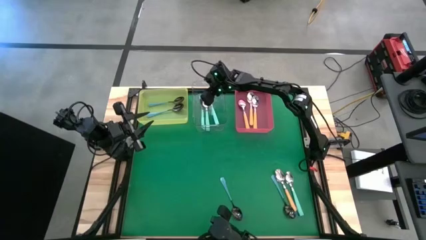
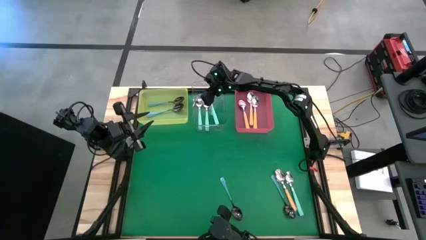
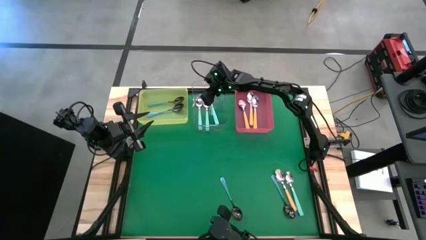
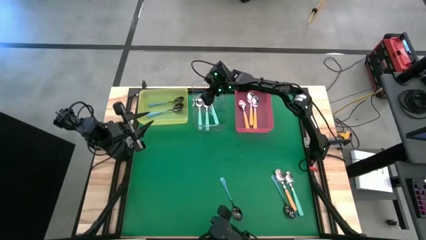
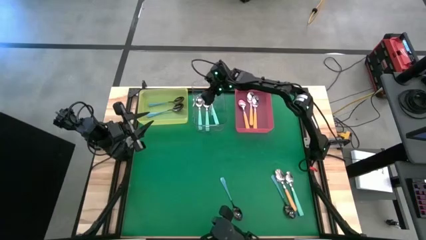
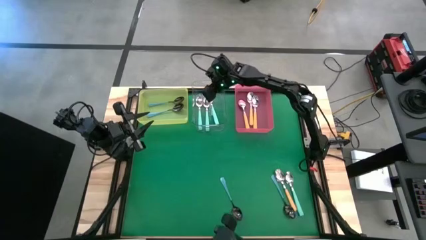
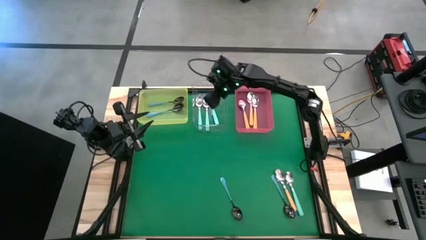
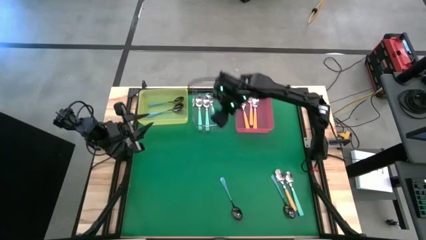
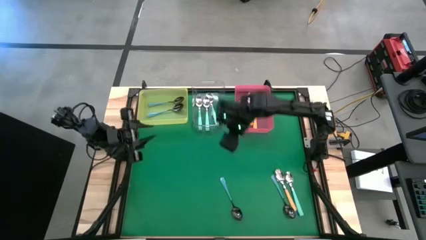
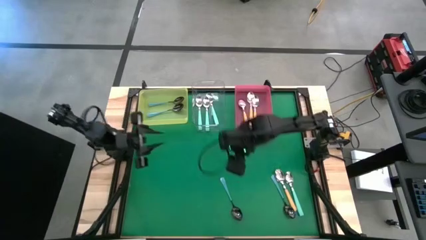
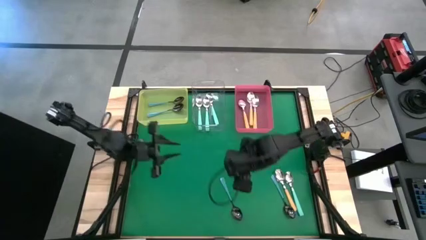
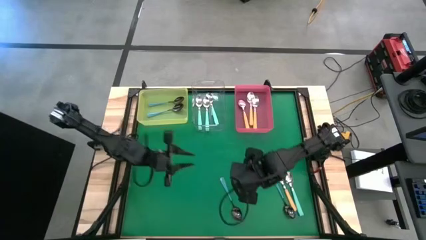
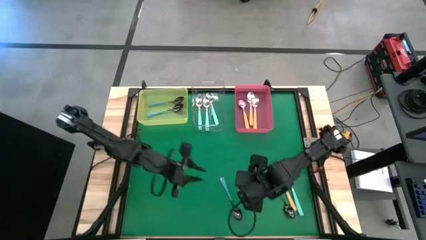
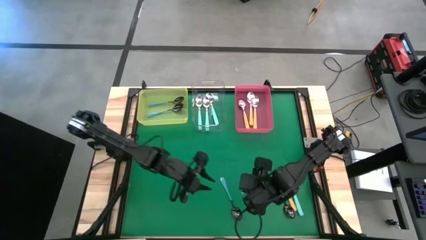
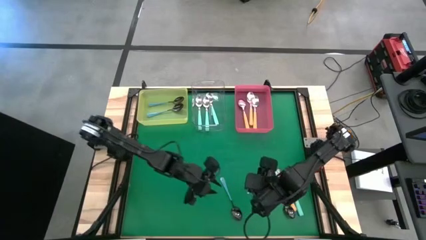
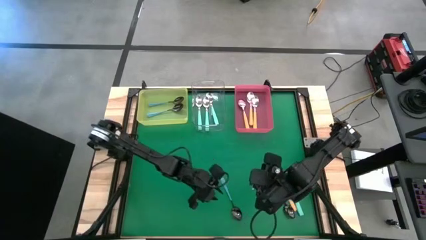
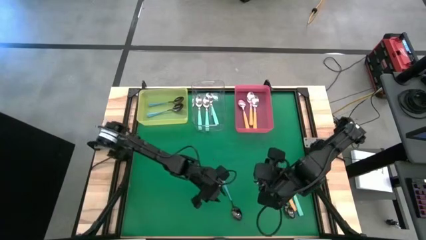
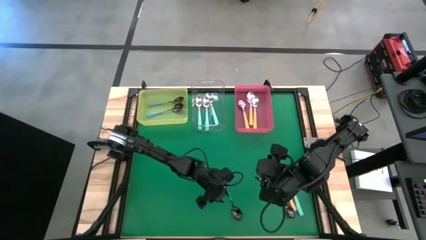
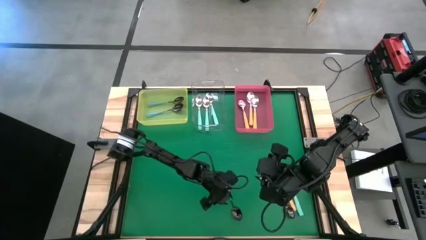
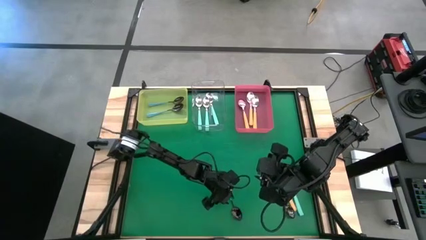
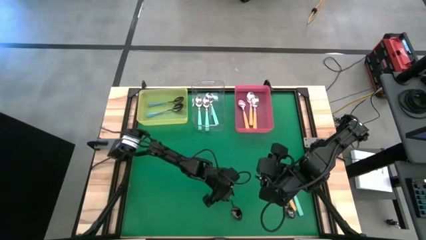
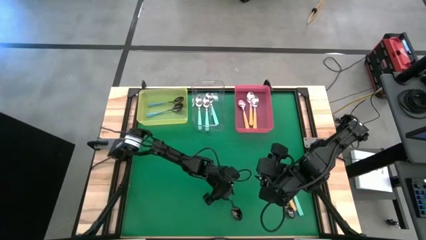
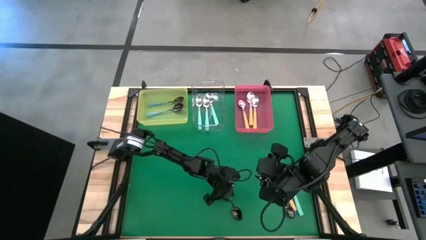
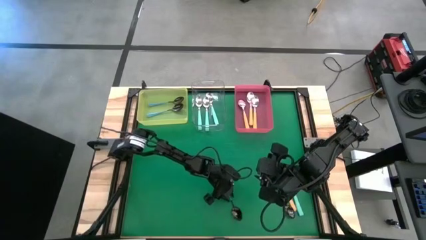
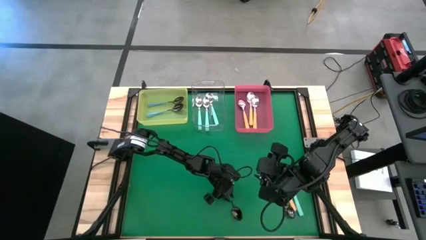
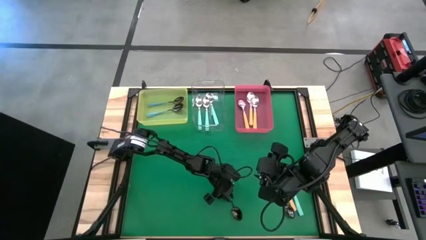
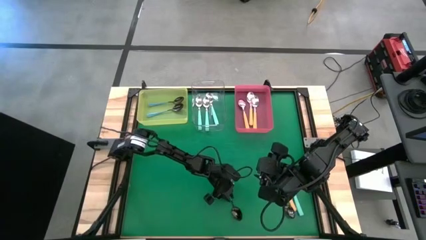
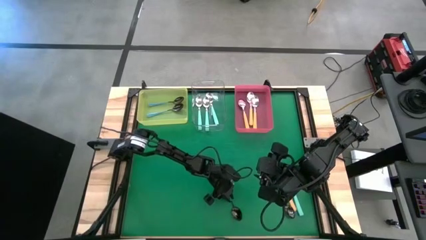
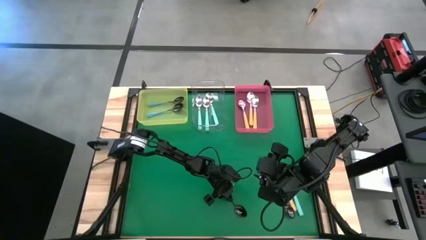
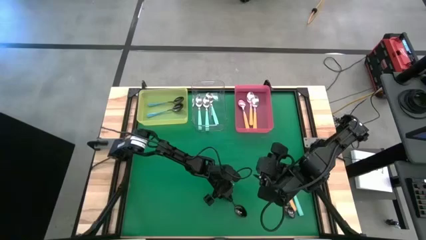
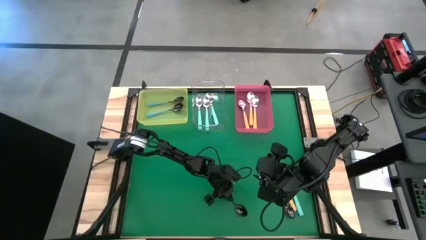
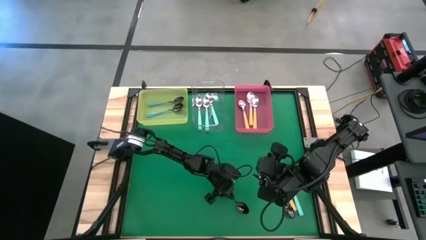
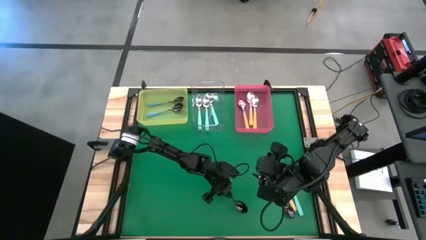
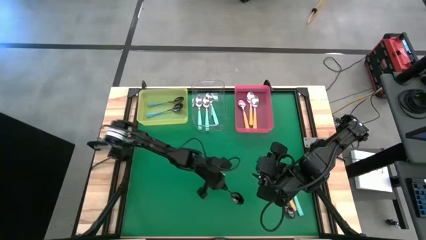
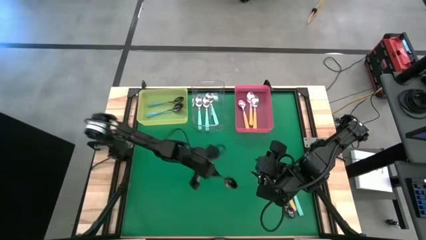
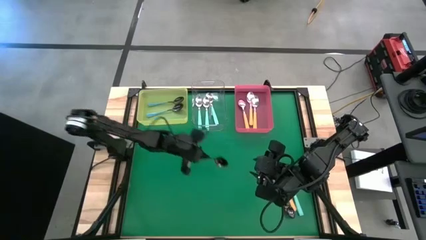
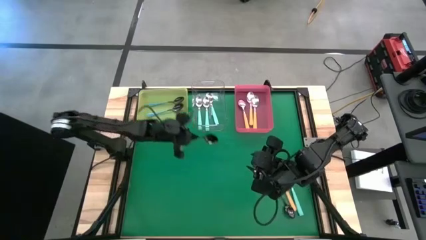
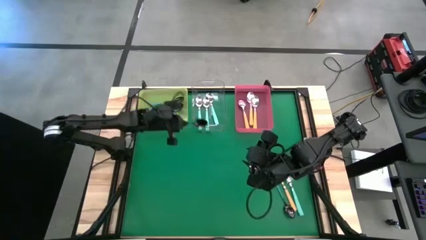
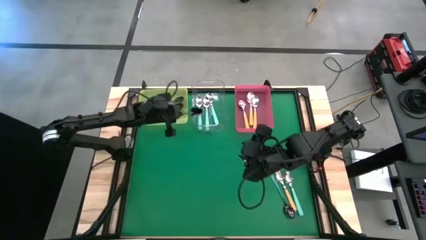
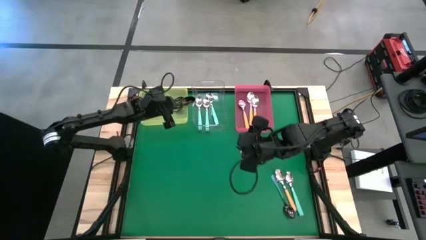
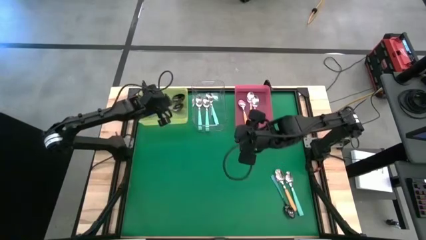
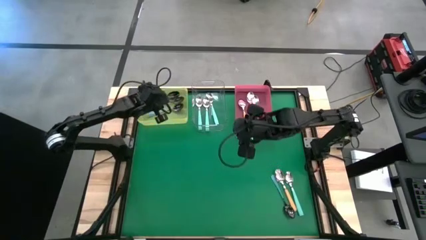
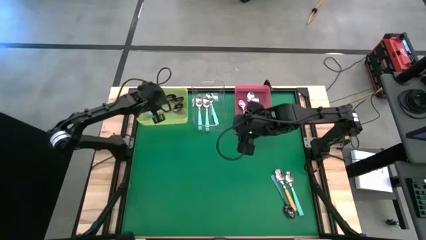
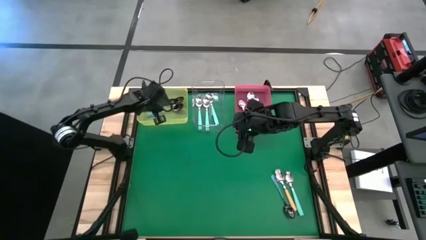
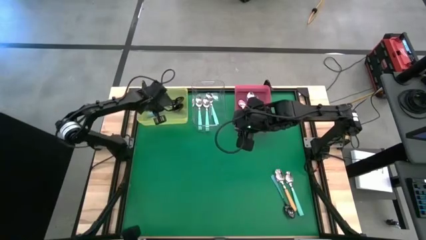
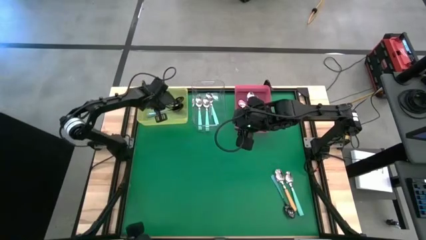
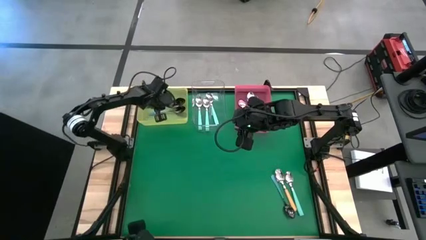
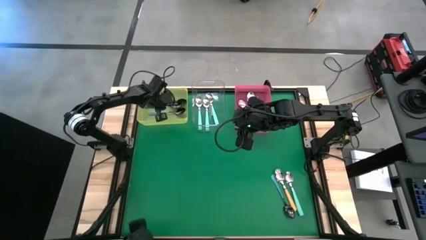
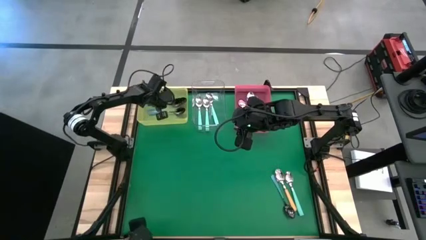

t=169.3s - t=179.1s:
Task: Sort silverware by color (type)
Put the blue spoon into the yellow bin
